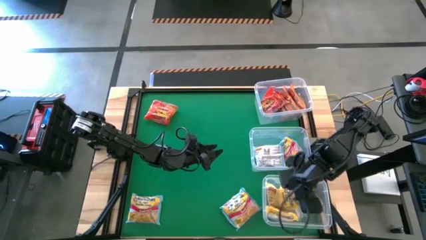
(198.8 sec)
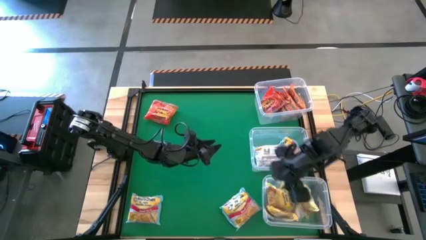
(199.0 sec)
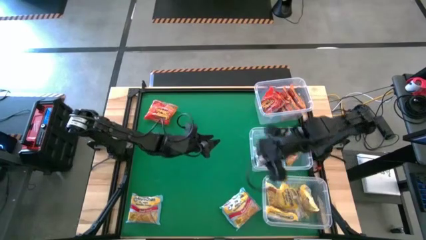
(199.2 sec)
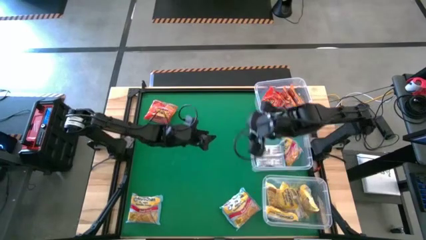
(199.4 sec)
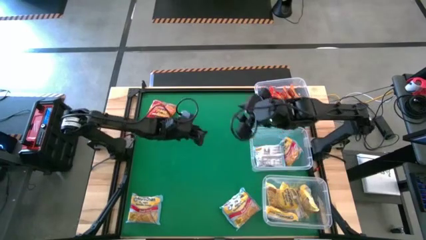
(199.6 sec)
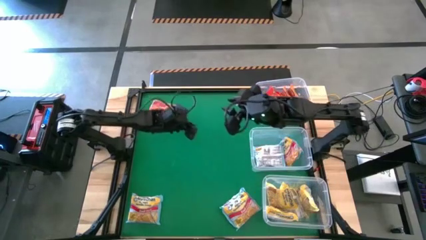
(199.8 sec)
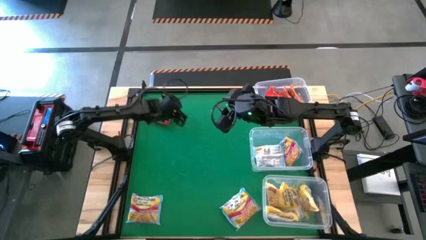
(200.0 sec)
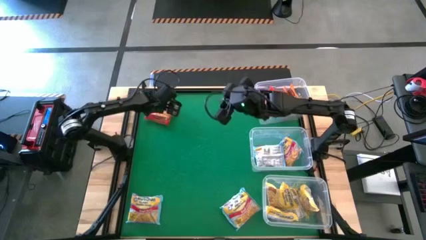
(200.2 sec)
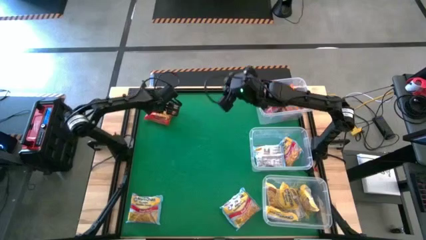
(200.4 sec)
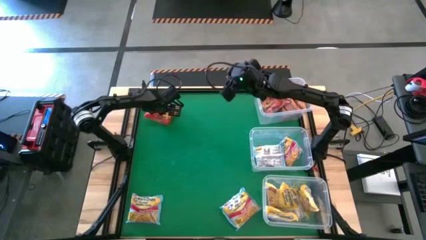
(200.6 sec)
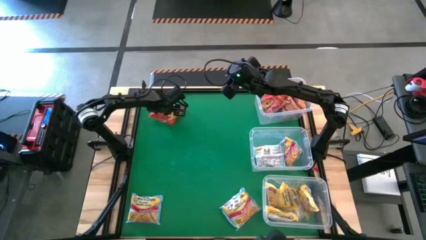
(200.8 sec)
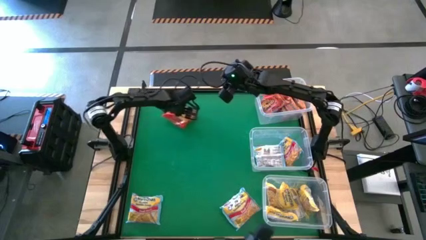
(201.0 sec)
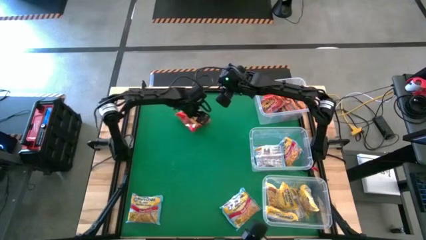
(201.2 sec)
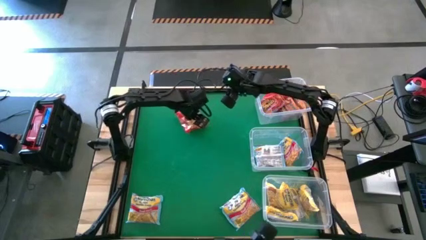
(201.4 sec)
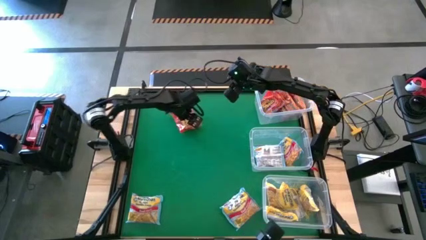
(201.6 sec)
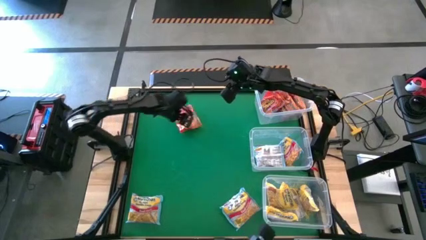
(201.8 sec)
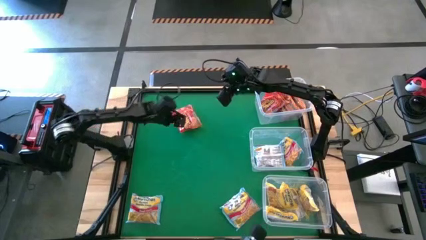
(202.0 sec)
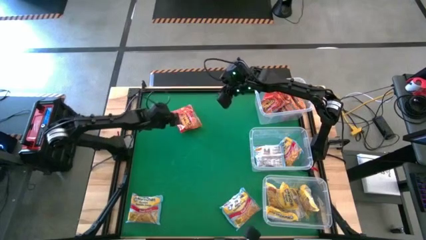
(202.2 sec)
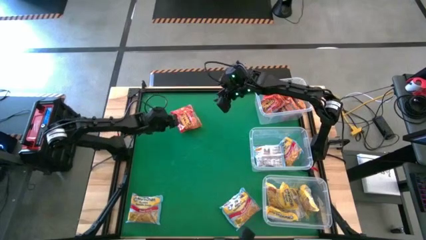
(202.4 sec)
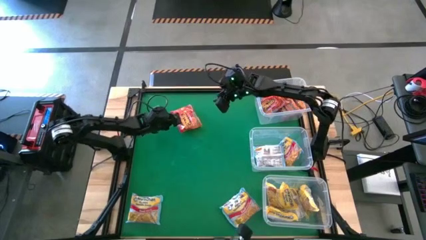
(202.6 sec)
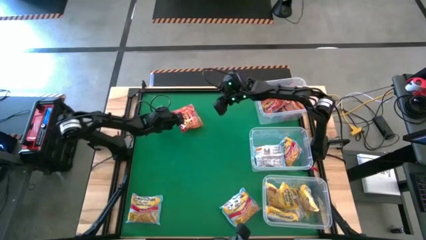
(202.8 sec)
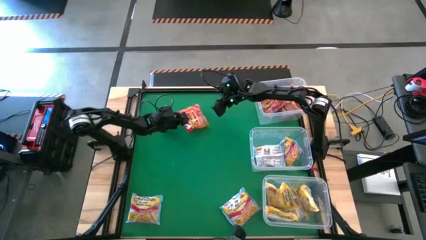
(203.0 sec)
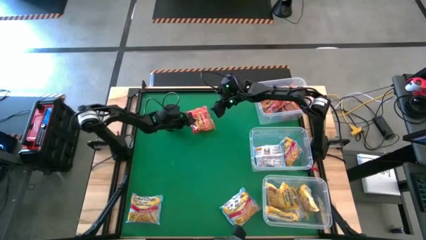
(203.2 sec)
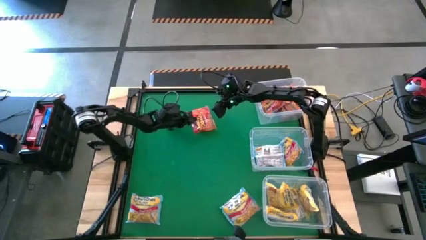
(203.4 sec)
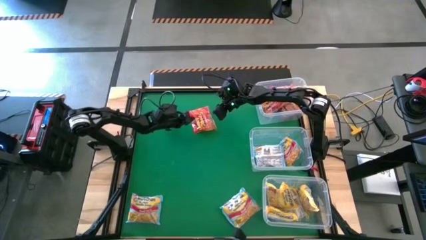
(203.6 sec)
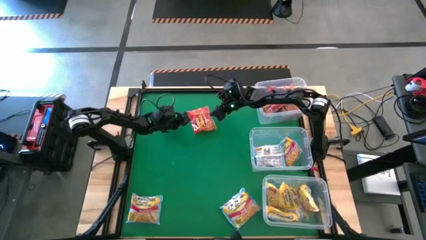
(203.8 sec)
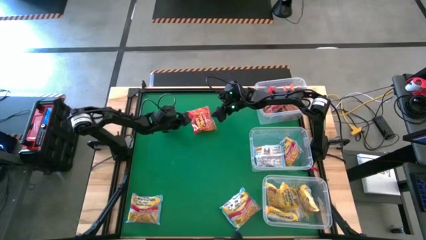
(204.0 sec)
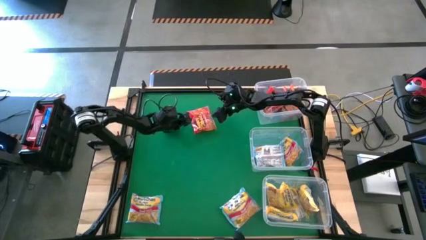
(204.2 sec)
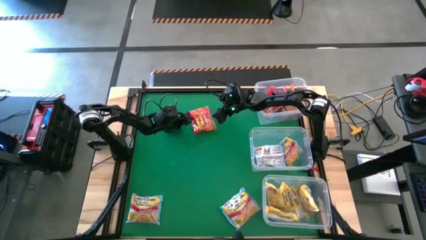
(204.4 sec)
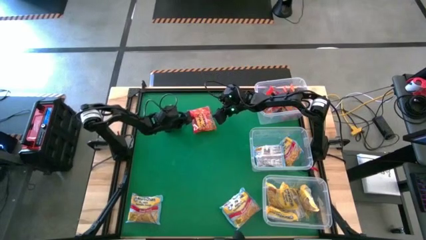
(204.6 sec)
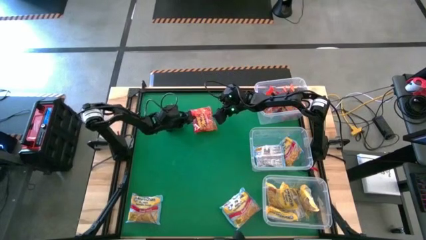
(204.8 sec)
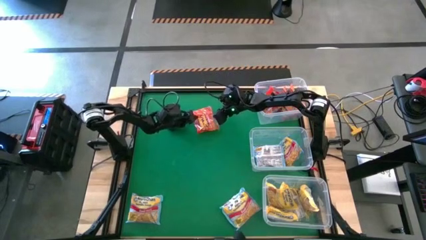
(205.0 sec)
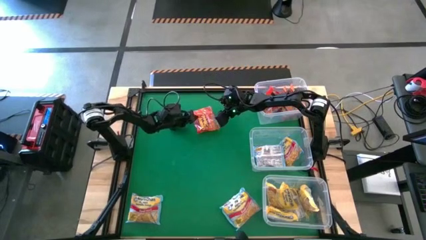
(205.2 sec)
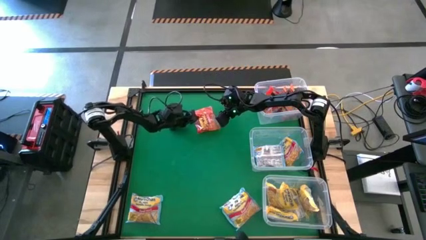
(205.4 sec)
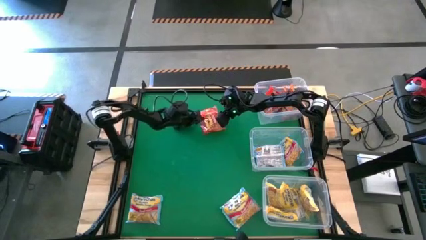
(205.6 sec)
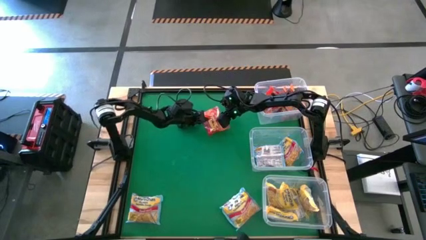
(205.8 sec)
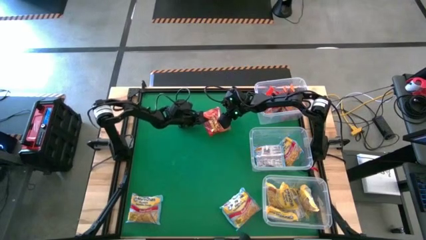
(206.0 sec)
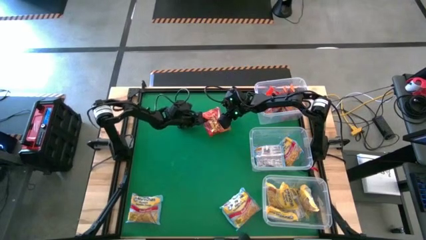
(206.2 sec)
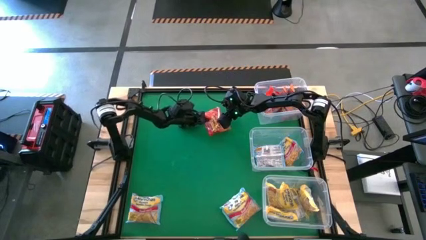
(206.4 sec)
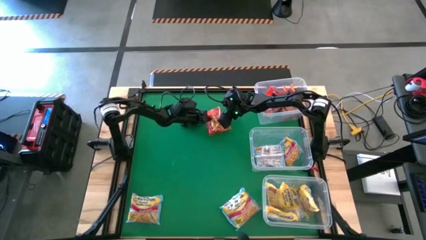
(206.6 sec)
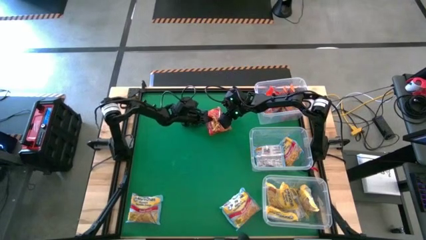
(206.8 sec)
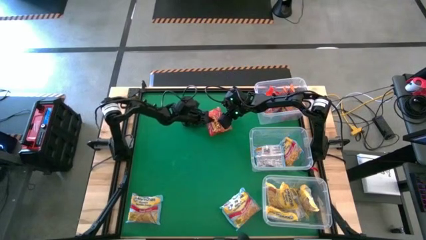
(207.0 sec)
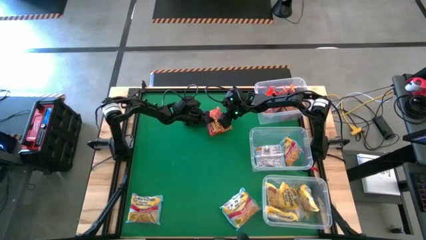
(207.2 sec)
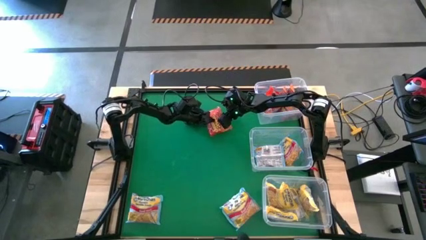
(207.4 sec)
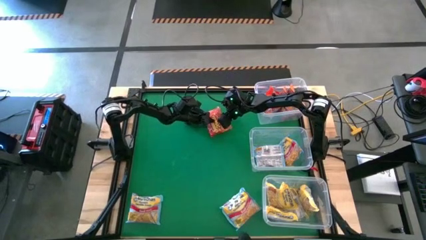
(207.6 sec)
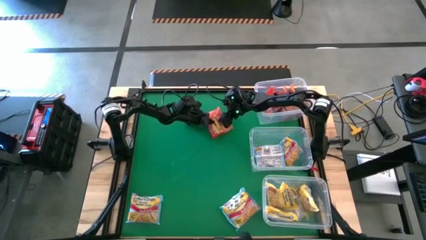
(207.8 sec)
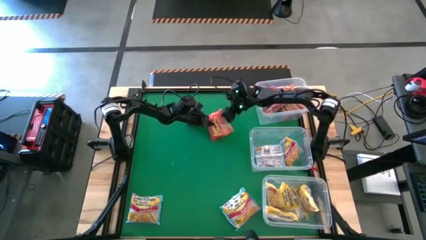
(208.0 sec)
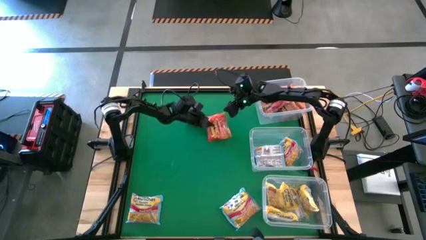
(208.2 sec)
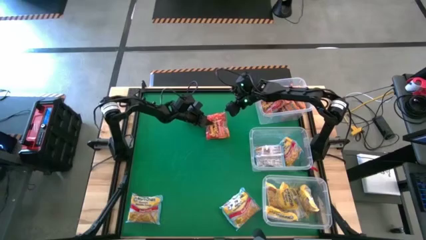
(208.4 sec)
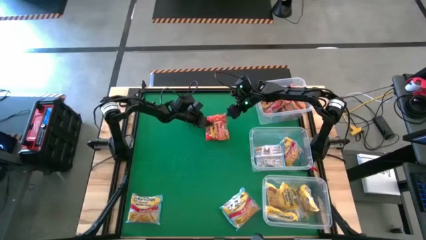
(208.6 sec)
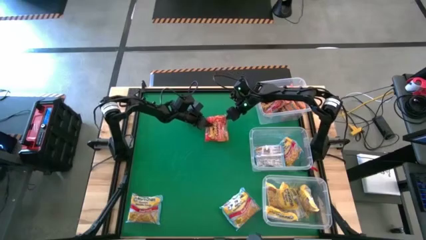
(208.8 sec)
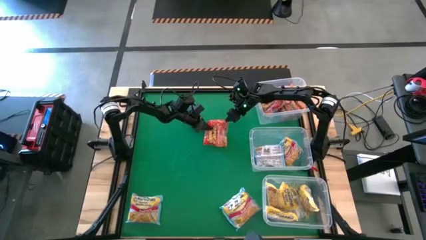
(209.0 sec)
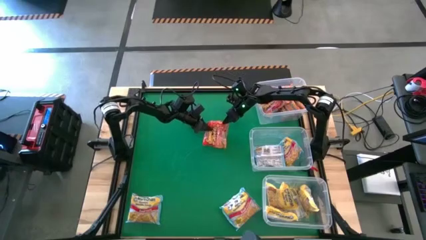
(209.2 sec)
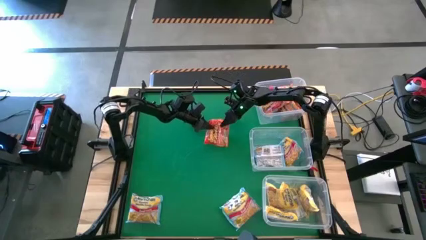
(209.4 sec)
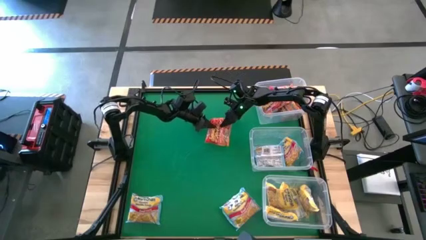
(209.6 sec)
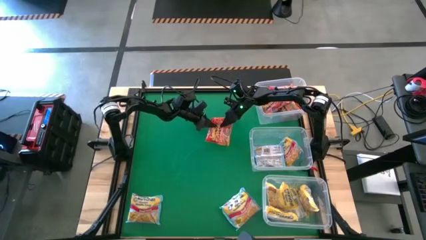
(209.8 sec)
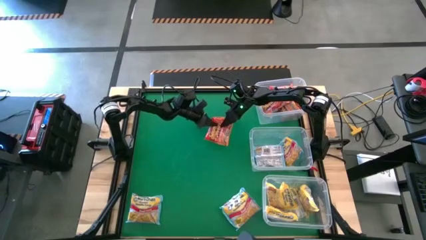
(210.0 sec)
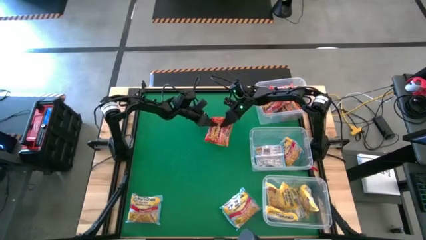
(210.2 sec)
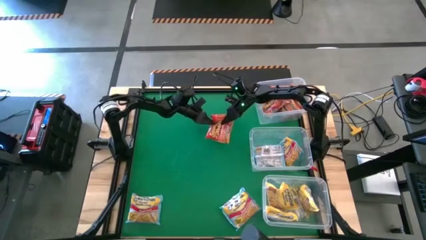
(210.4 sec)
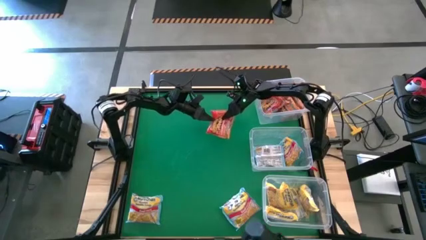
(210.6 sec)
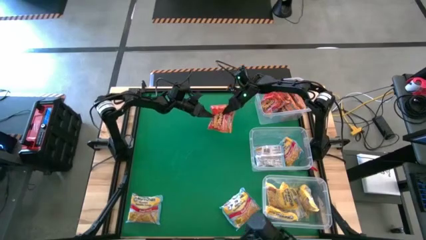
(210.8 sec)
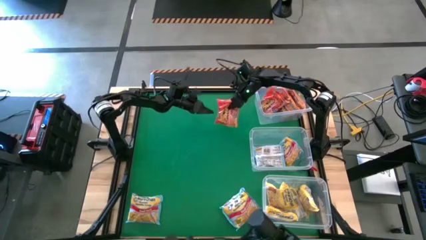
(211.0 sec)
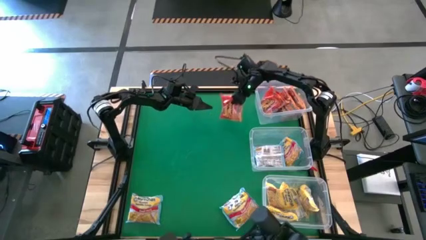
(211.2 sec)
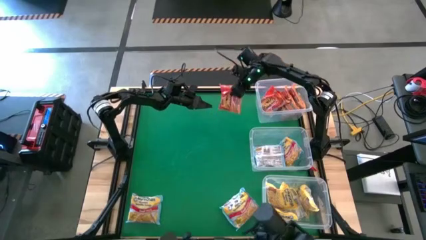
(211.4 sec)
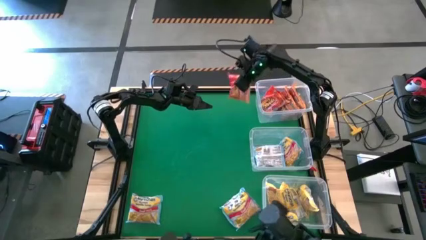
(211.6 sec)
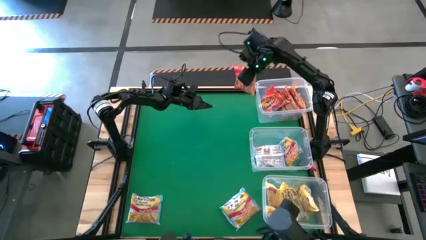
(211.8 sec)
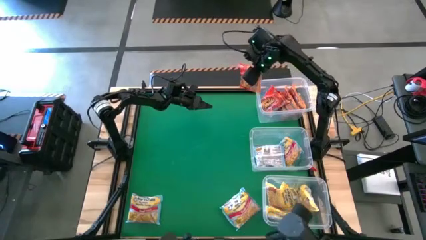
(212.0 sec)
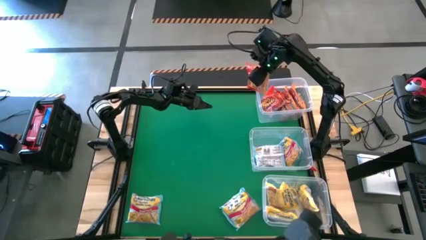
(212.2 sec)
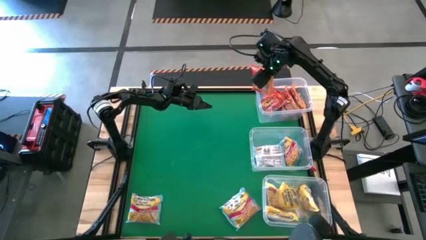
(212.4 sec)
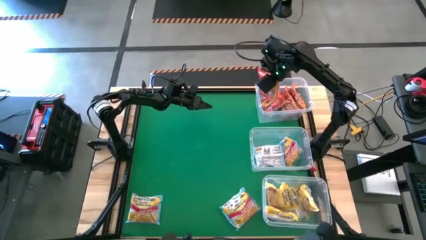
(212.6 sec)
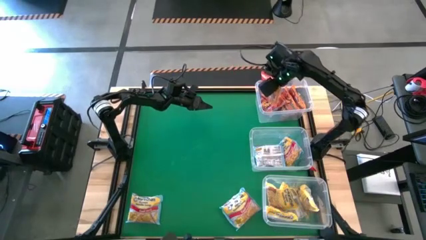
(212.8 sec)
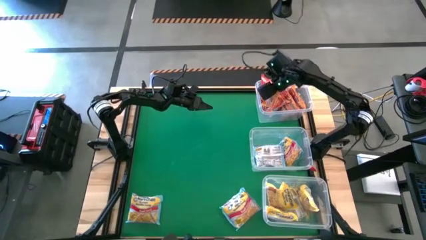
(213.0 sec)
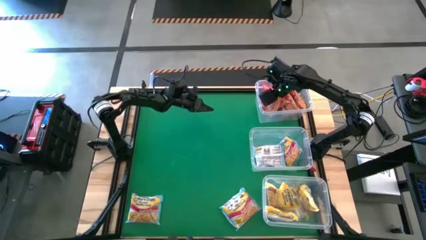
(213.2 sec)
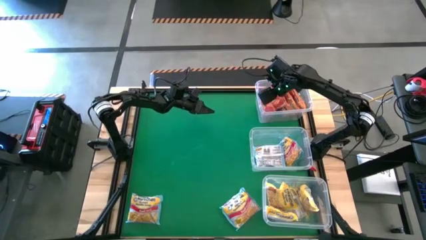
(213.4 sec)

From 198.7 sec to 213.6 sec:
Task: Sort Maruchan noodles
Put the red noodle pack into the top transparent bin
